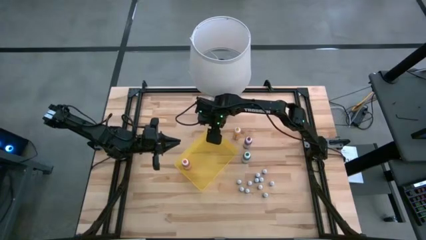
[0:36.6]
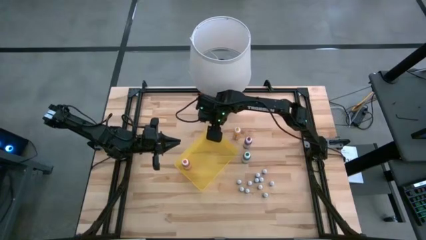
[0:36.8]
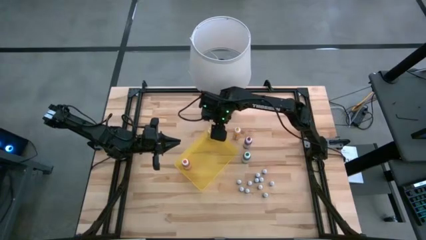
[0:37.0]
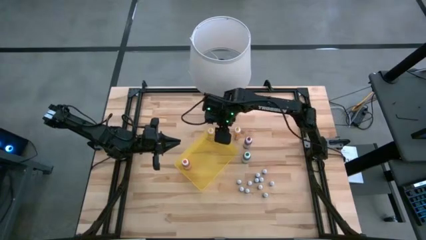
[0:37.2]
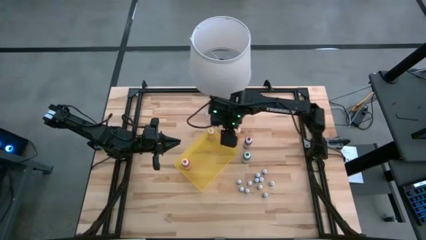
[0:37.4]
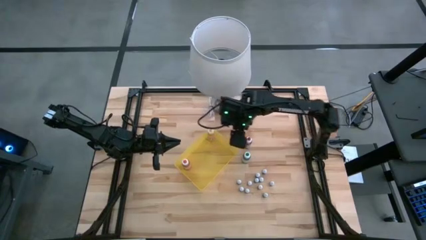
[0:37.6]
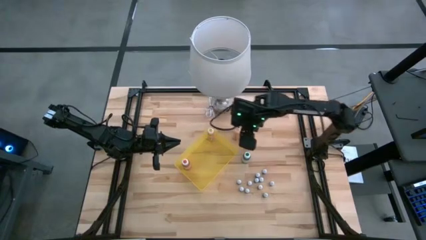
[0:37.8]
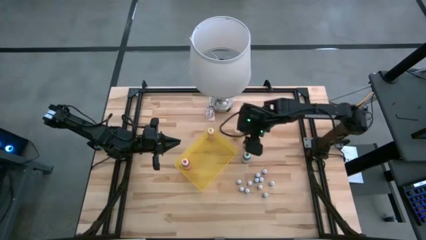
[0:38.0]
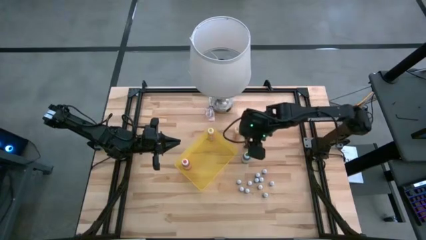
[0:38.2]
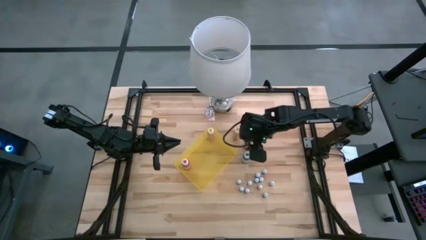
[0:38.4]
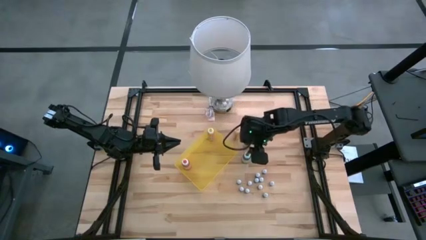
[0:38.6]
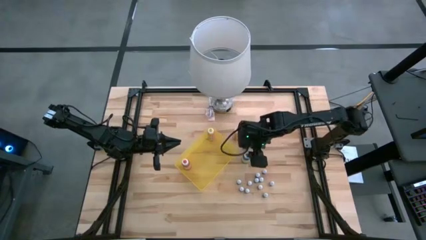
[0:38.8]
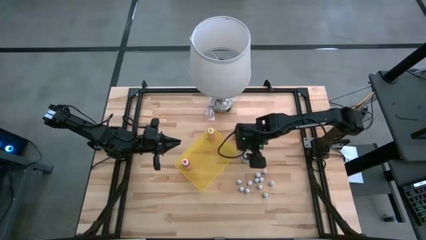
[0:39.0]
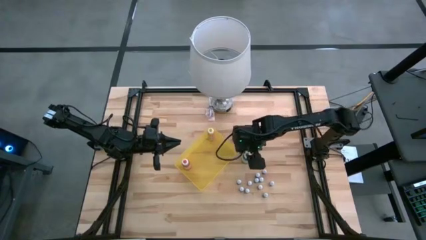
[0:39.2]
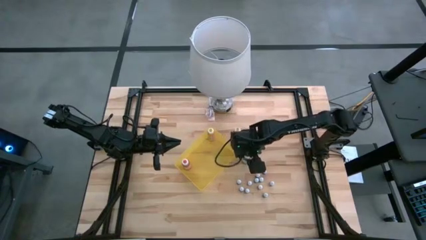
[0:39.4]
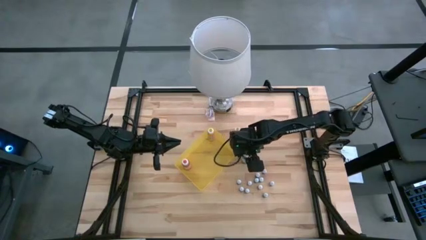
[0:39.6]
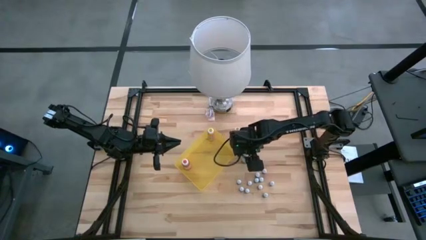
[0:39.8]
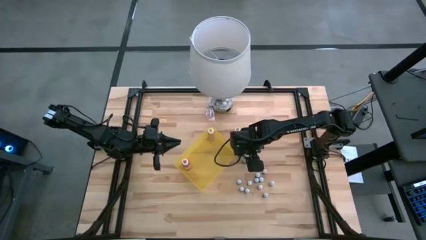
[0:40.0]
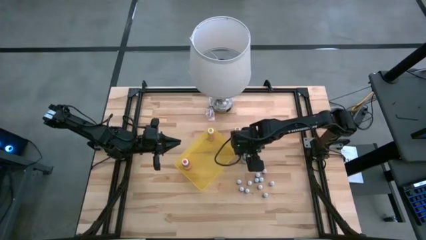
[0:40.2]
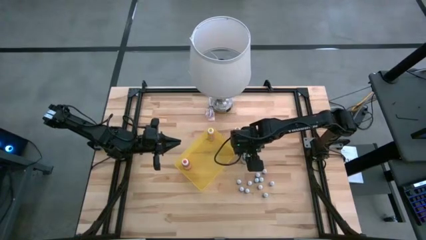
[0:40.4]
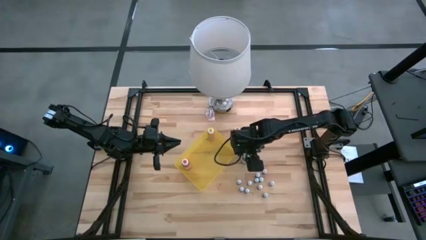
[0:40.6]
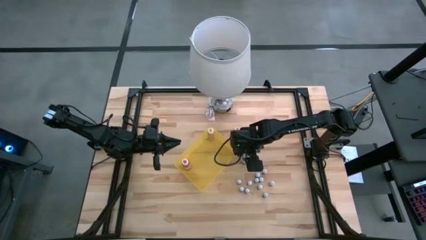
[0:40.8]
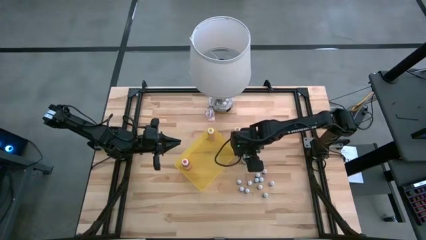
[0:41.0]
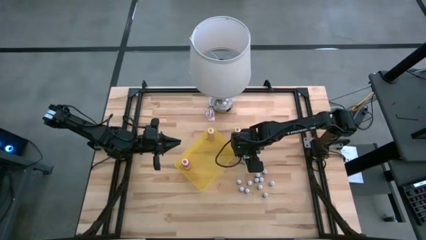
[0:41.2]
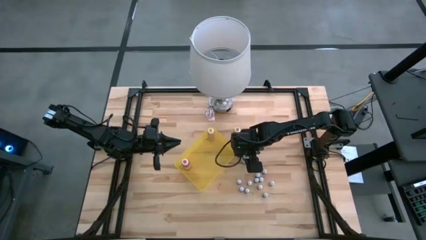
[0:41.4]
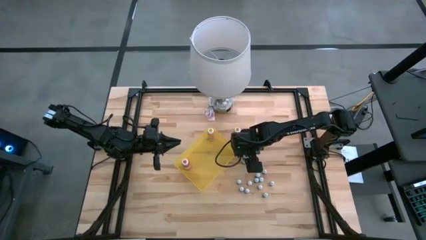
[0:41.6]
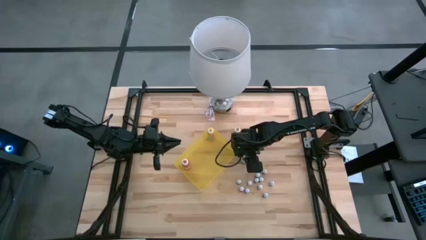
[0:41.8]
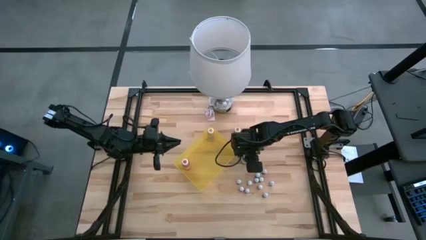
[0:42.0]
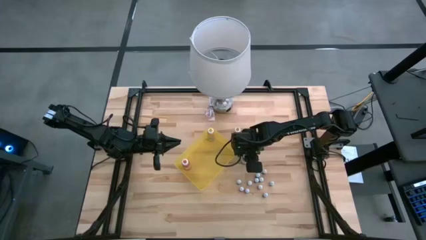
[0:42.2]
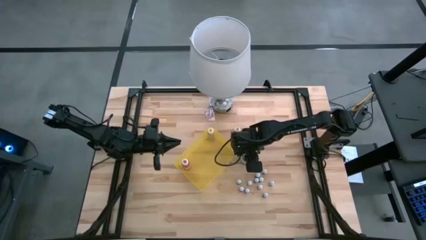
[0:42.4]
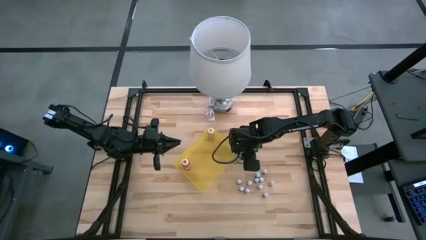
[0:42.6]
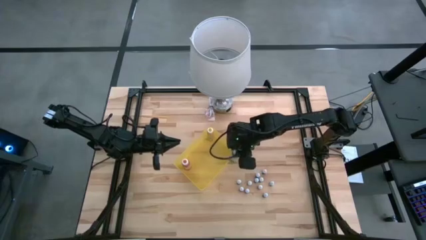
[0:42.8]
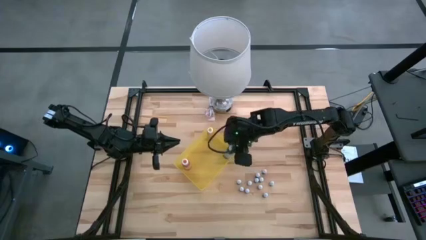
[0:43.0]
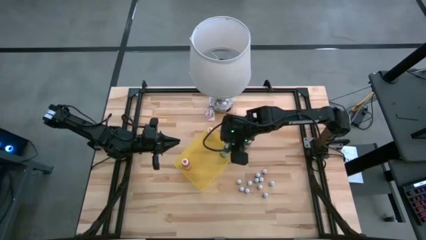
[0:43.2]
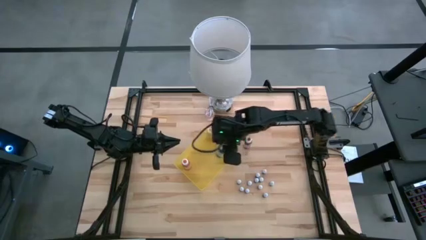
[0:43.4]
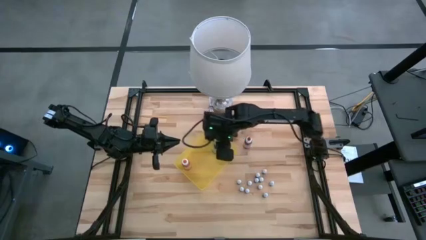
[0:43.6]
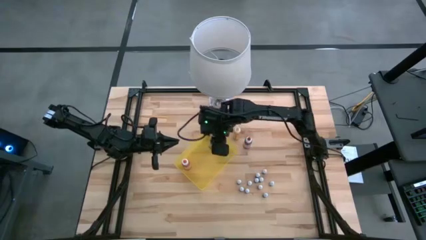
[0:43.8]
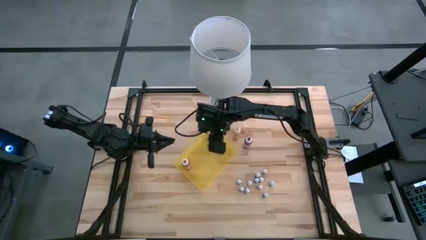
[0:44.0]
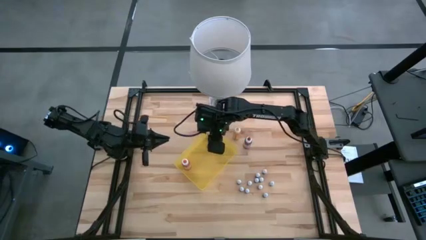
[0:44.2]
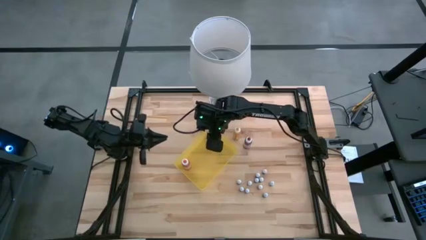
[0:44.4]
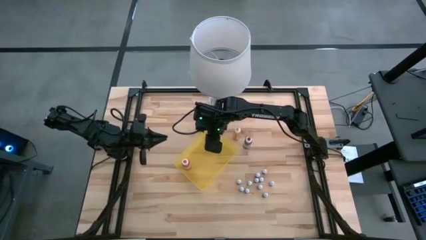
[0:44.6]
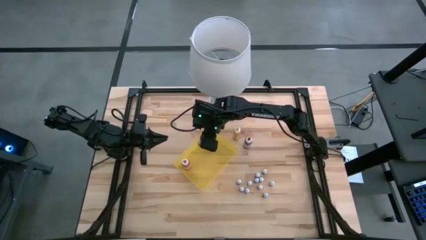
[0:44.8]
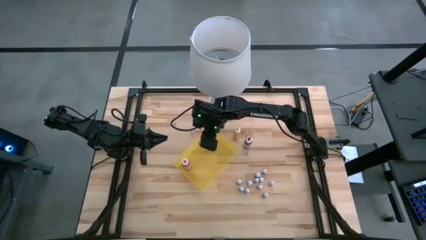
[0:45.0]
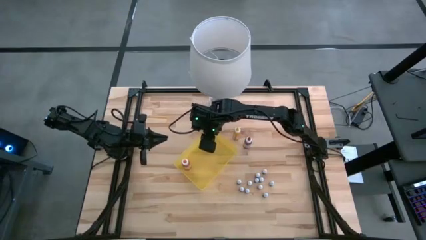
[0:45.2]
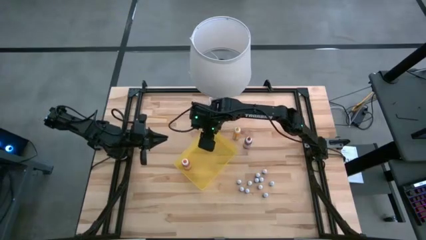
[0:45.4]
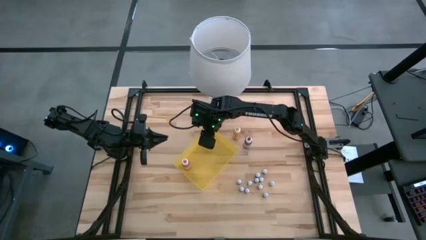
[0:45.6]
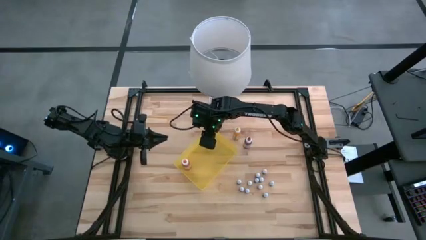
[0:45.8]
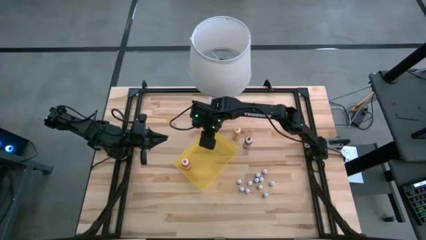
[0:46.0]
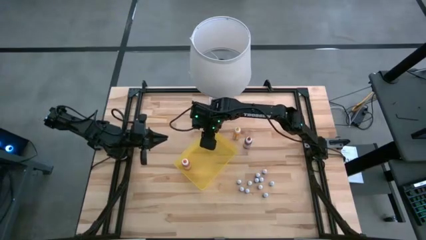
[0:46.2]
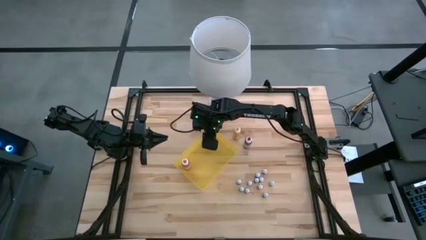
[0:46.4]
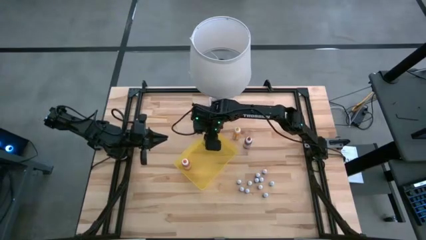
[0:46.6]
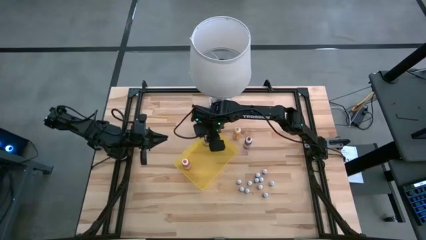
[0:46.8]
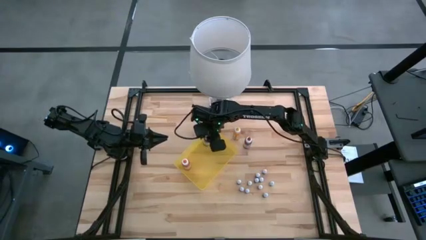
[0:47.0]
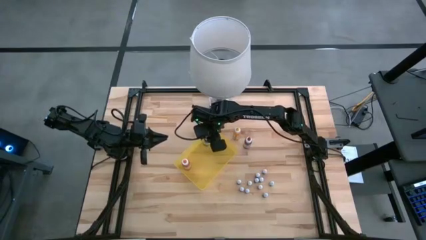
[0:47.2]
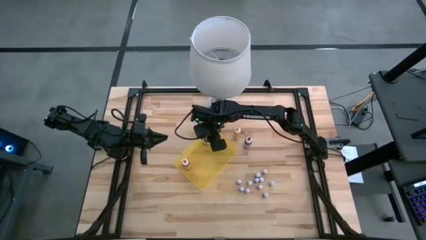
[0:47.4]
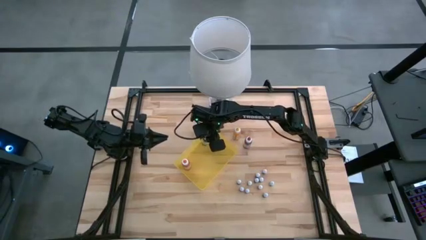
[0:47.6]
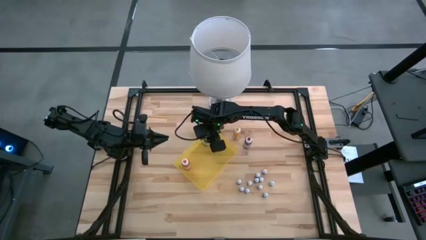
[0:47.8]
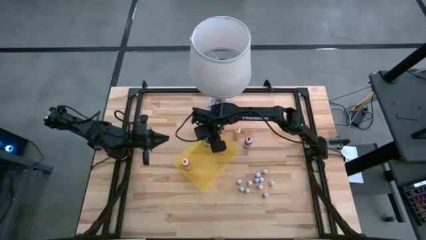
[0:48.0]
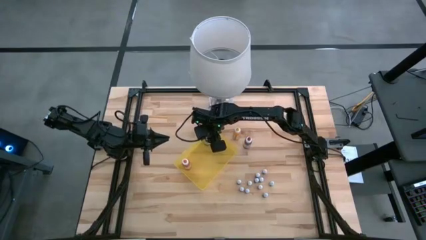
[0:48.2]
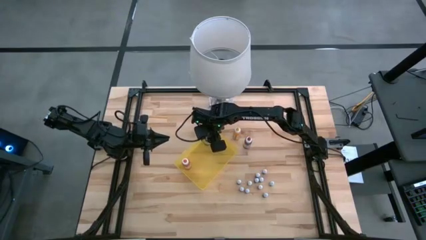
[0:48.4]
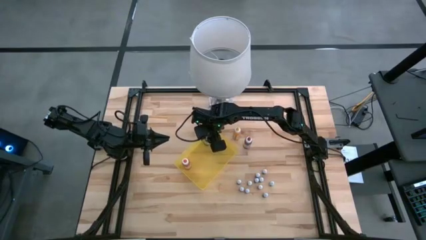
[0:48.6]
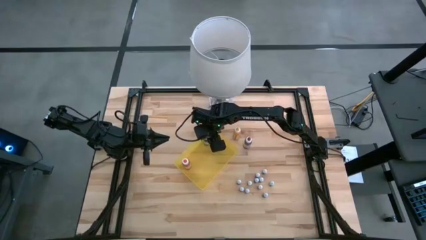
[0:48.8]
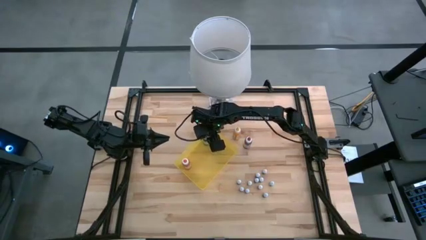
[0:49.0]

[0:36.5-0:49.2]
Task: Pick & Place food coloring
Put the large green food coloring bottle into the yellow bin

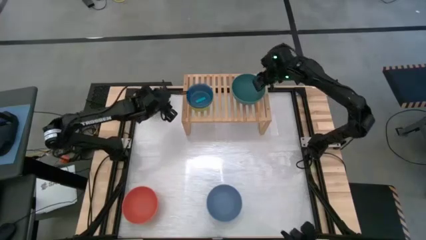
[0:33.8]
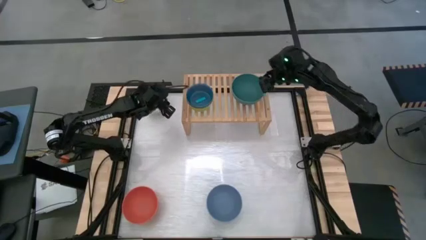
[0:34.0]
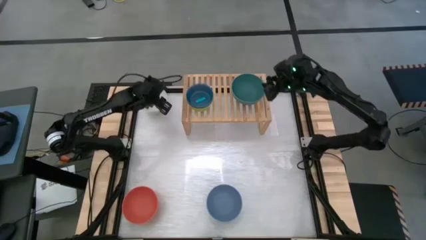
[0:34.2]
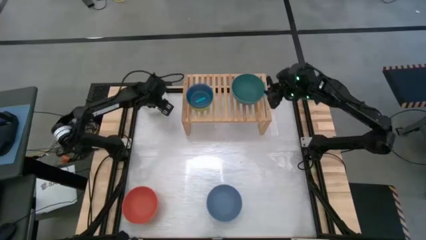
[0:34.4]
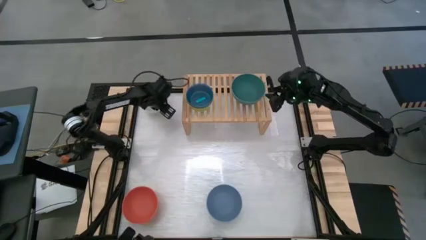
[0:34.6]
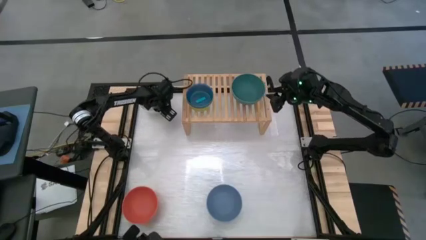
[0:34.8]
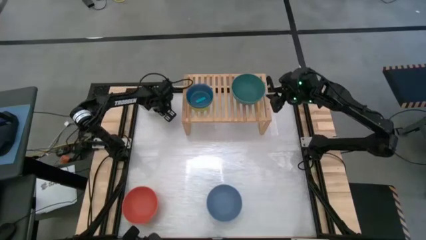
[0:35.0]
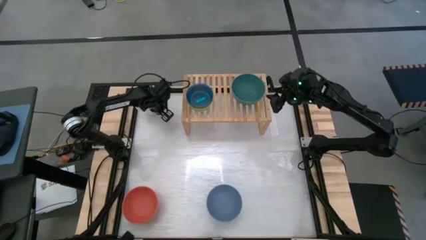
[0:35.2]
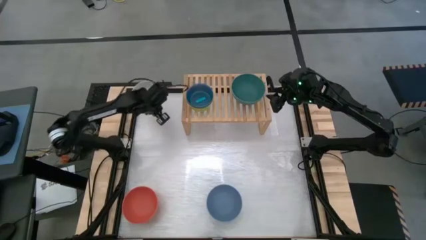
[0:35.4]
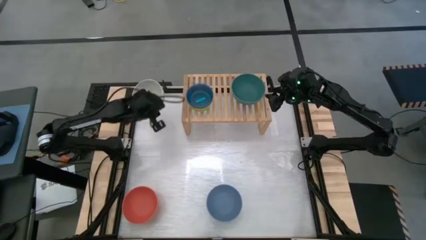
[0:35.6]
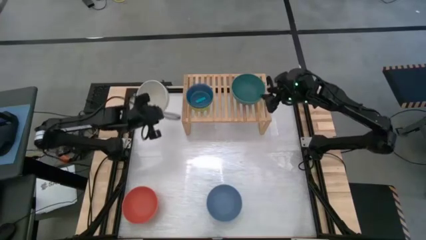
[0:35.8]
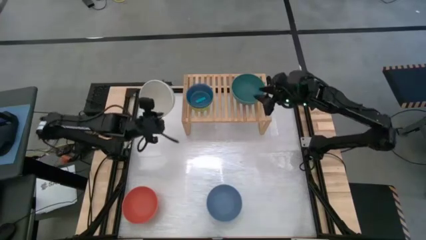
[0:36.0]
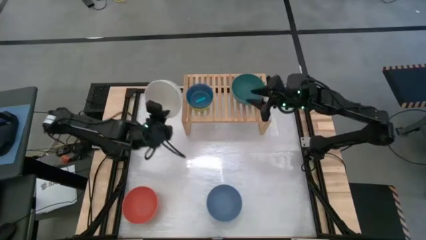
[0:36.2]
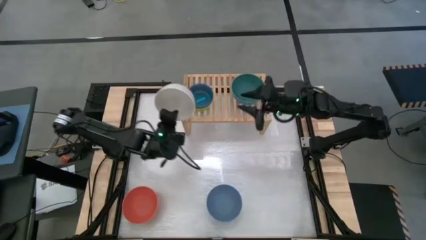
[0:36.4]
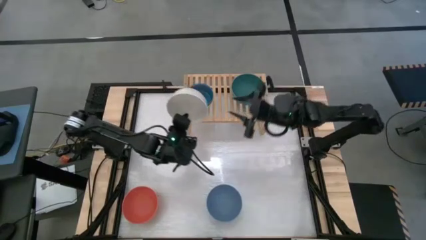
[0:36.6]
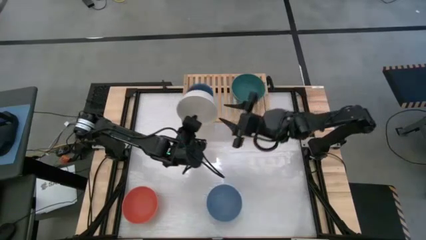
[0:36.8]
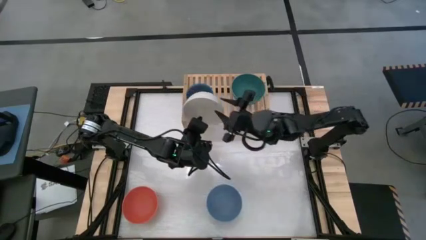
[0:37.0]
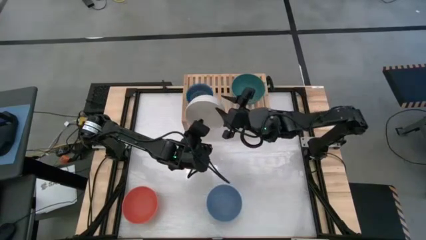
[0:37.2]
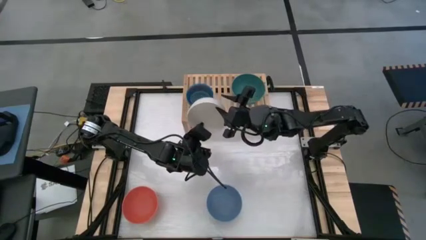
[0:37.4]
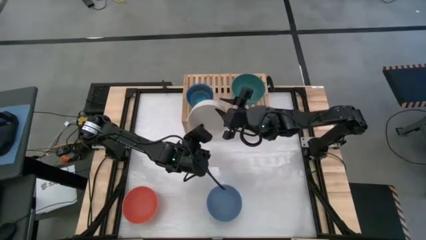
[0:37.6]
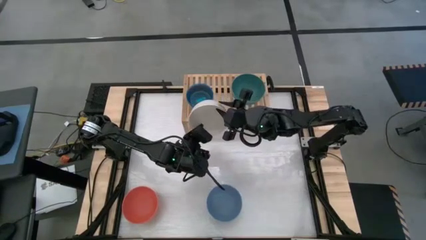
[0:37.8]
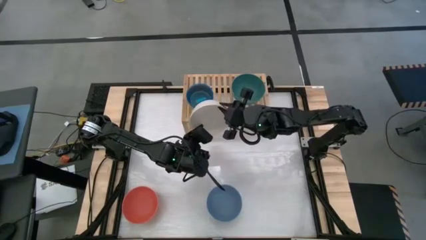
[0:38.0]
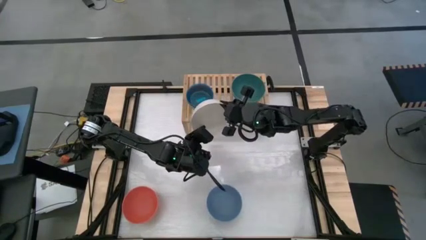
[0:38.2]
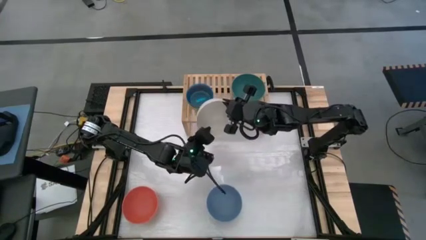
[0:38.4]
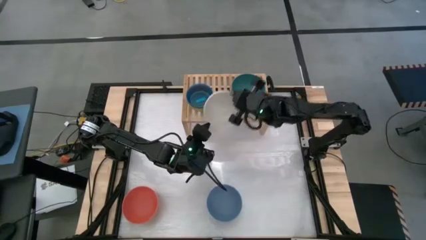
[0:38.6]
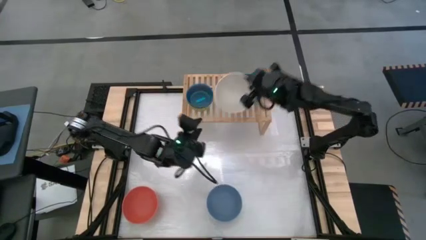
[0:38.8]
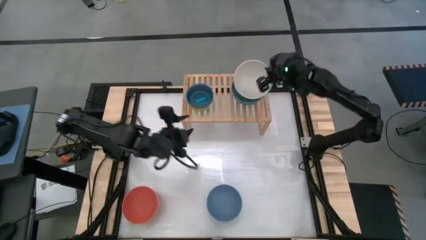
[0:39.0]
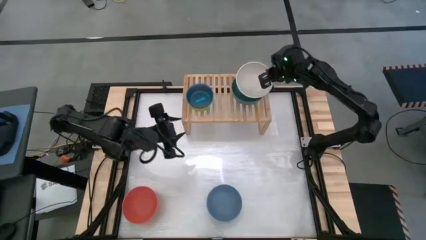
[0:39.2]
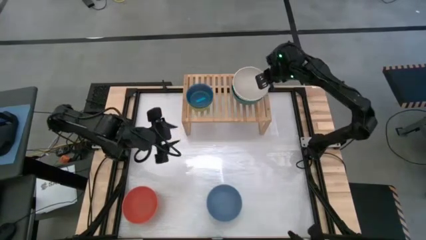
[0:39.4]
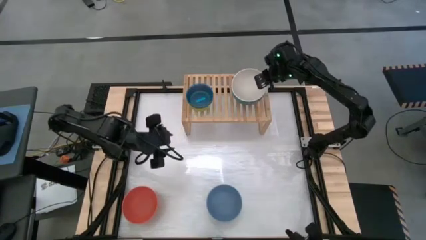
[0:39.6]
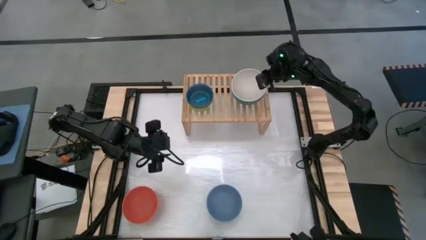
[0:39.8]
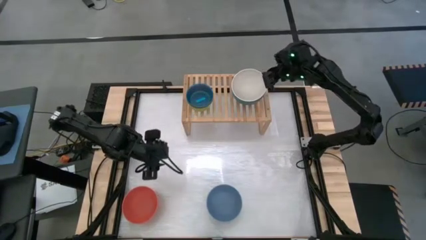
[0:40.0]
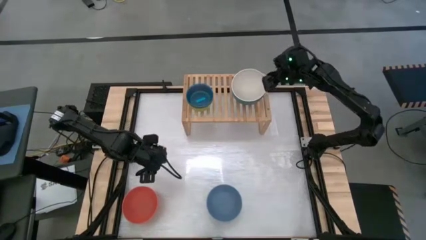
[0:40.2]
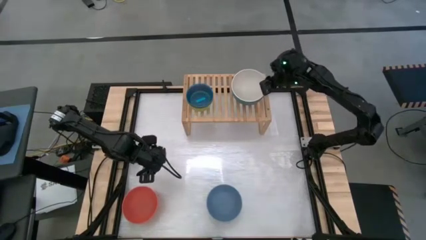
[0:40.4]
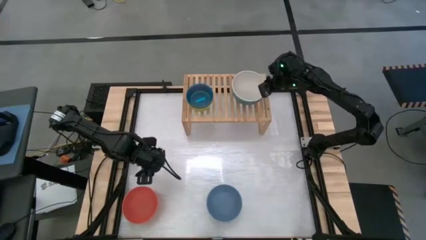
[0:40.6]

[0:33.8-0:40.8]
Task: Place and stack bowls onto a shelf
Stack the large white bowl on top of the large dark green bowl on the shelf
